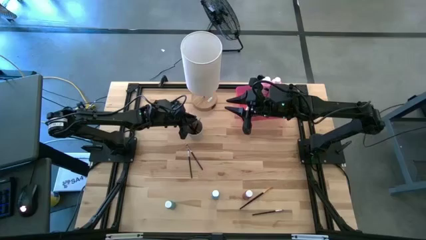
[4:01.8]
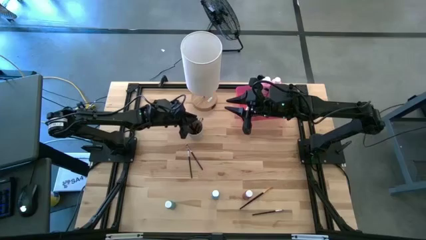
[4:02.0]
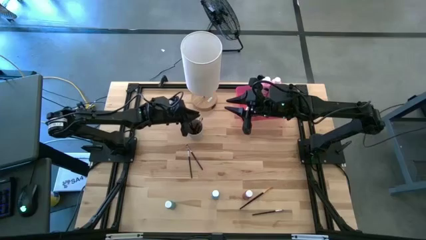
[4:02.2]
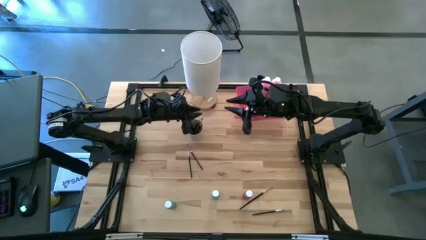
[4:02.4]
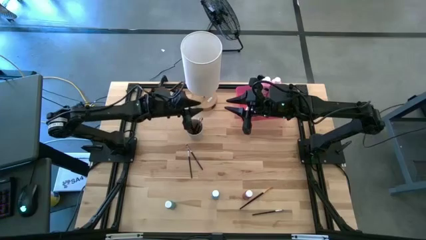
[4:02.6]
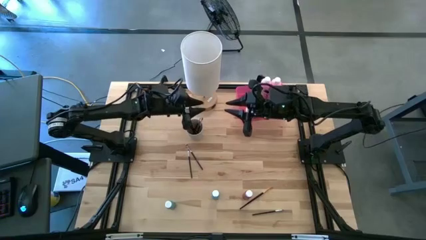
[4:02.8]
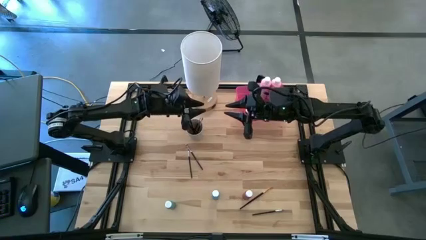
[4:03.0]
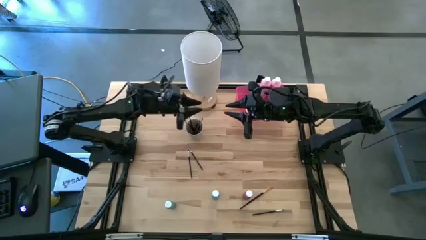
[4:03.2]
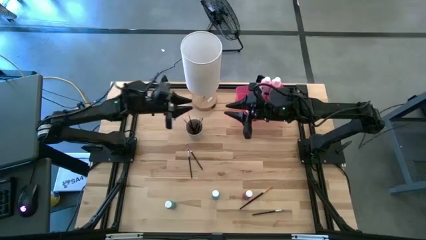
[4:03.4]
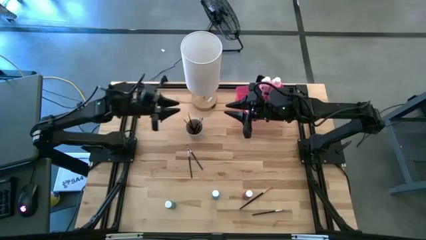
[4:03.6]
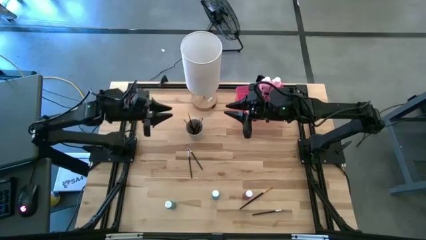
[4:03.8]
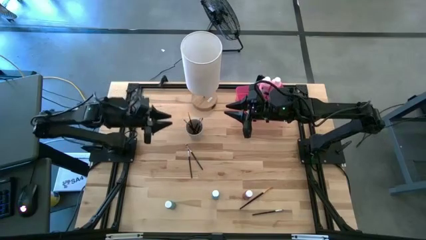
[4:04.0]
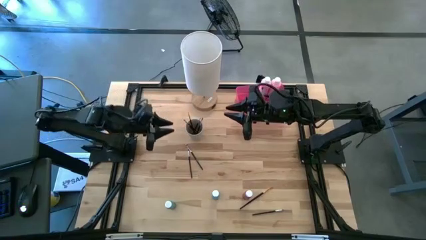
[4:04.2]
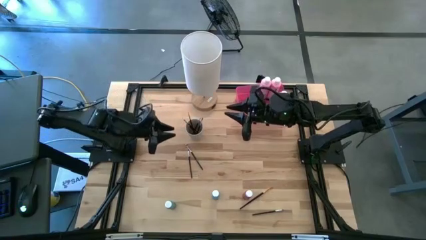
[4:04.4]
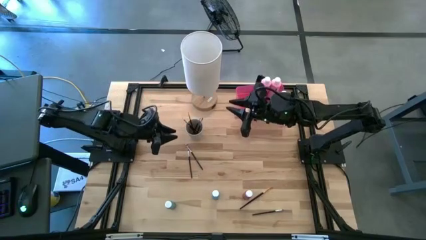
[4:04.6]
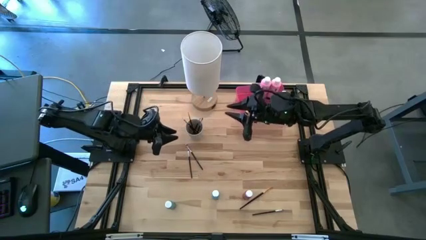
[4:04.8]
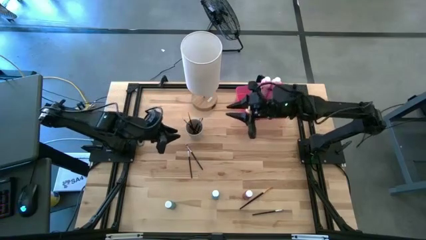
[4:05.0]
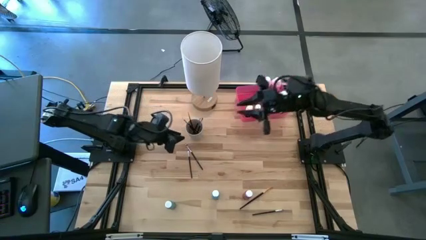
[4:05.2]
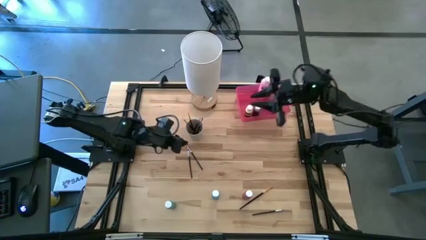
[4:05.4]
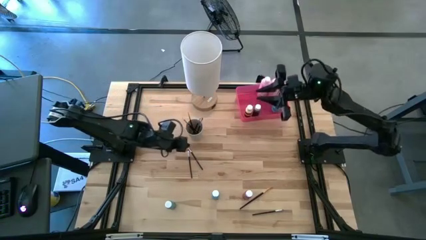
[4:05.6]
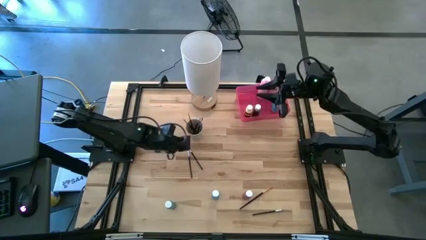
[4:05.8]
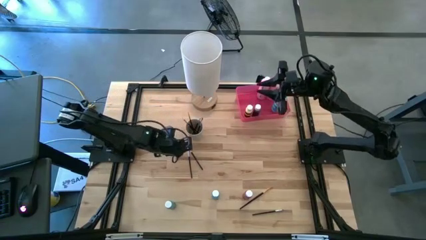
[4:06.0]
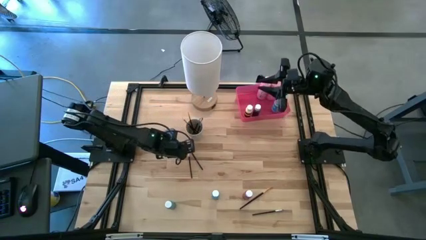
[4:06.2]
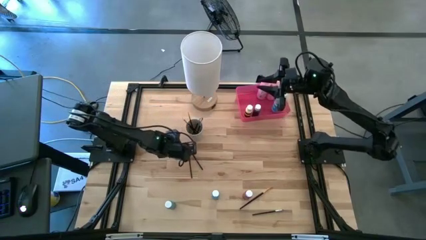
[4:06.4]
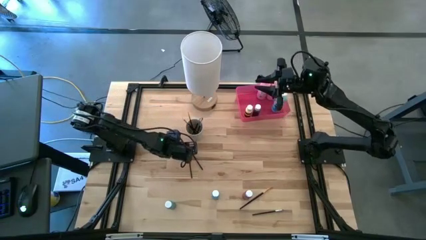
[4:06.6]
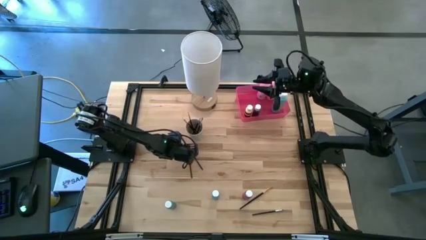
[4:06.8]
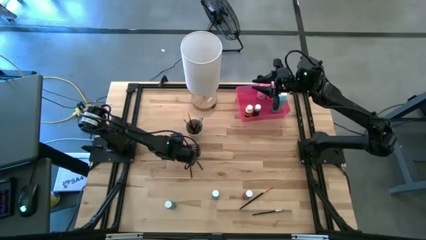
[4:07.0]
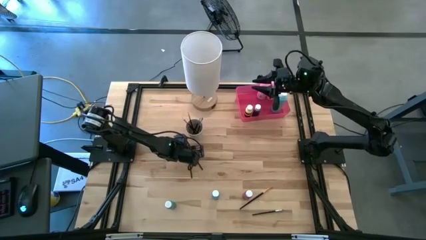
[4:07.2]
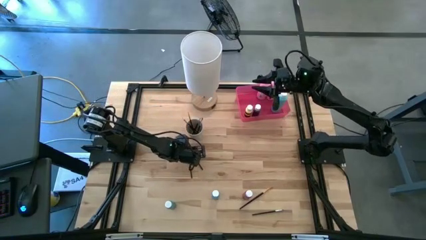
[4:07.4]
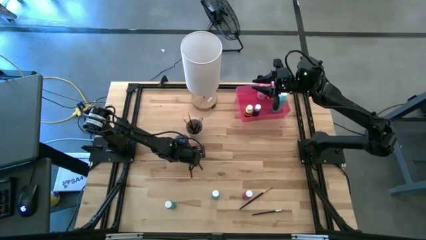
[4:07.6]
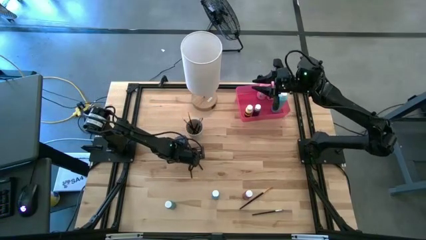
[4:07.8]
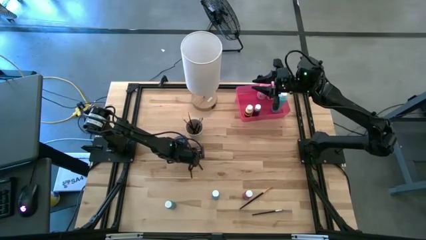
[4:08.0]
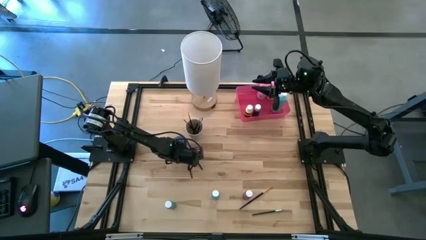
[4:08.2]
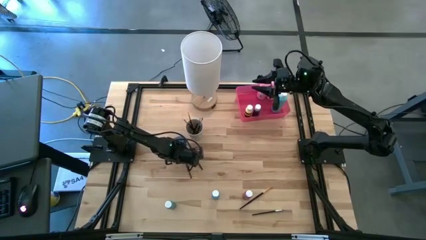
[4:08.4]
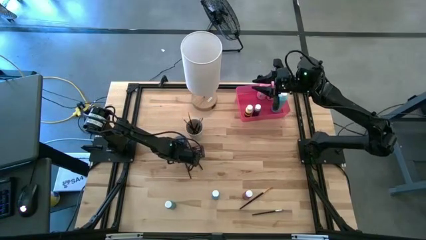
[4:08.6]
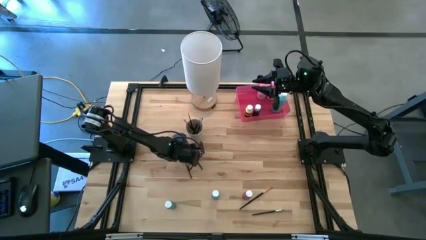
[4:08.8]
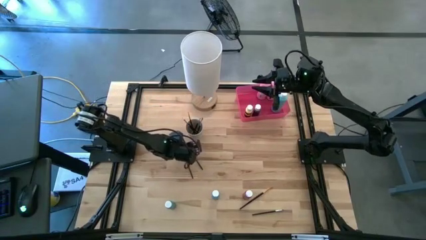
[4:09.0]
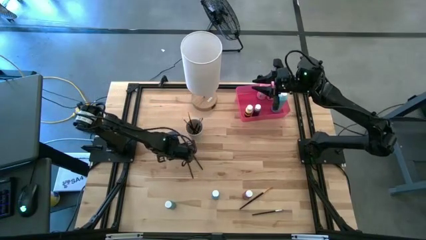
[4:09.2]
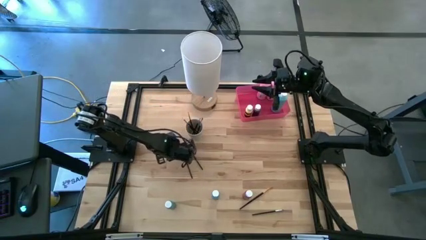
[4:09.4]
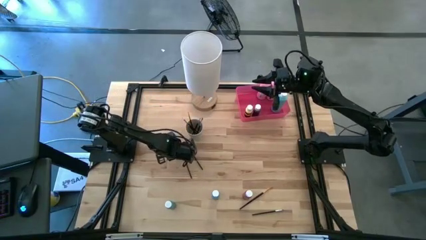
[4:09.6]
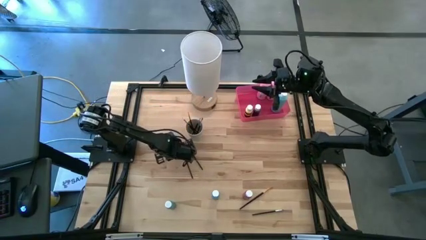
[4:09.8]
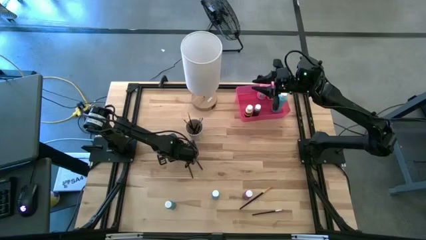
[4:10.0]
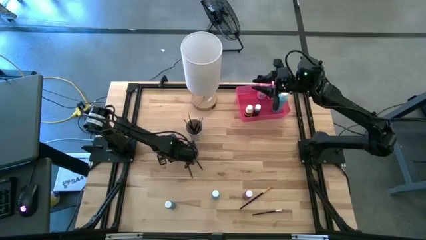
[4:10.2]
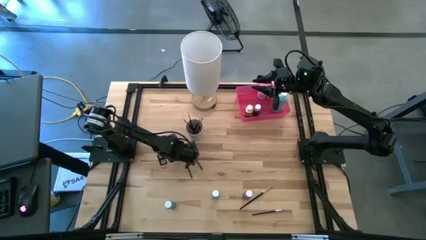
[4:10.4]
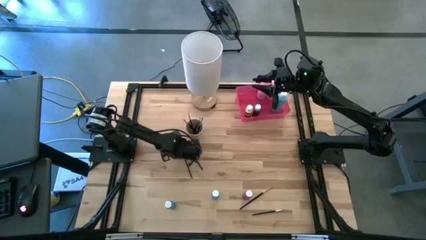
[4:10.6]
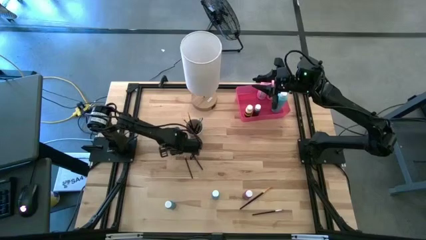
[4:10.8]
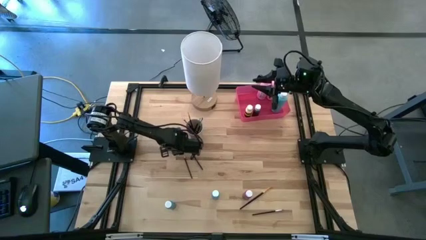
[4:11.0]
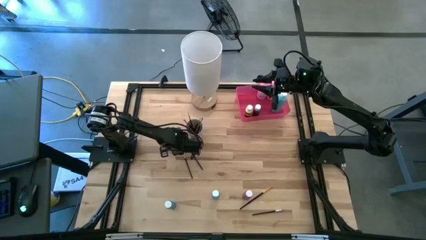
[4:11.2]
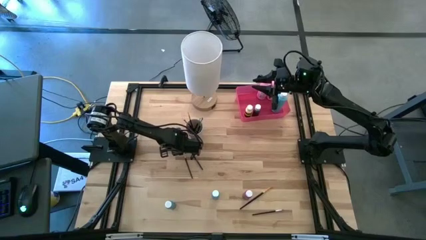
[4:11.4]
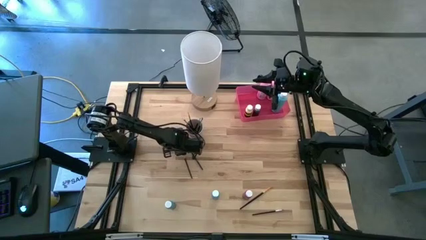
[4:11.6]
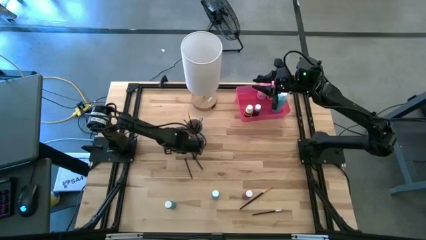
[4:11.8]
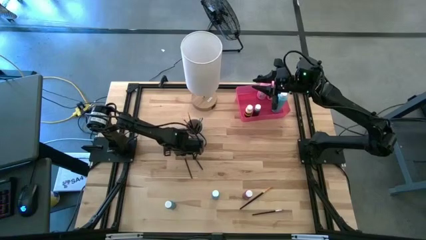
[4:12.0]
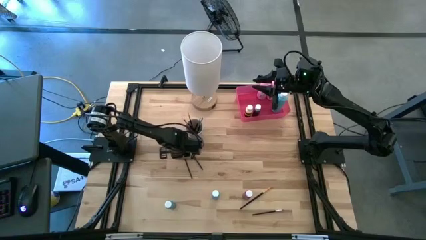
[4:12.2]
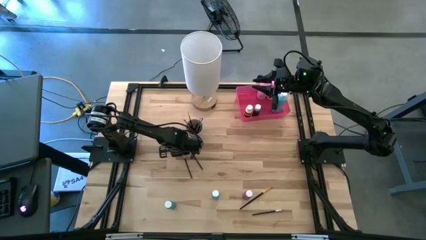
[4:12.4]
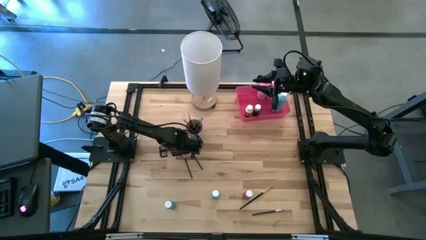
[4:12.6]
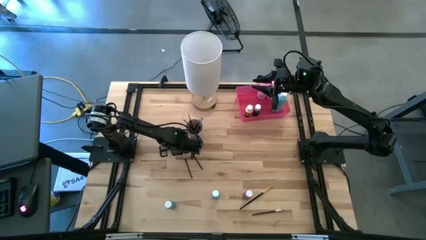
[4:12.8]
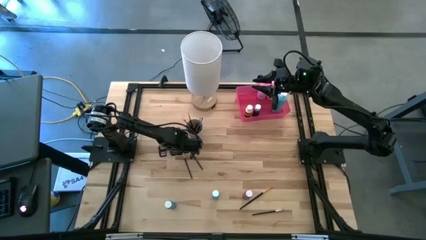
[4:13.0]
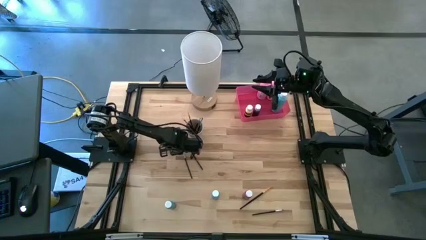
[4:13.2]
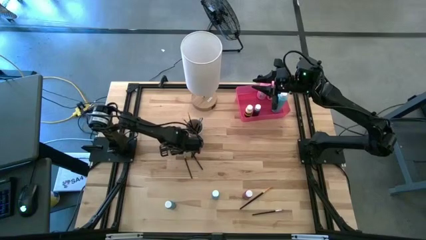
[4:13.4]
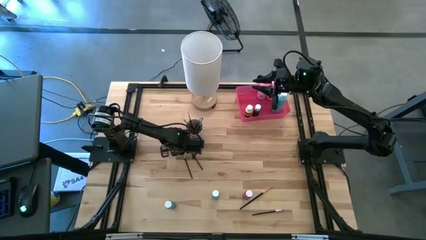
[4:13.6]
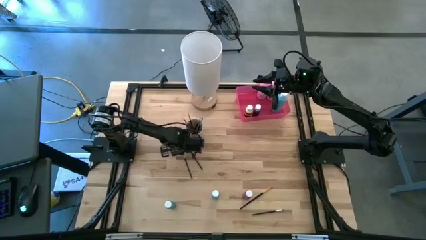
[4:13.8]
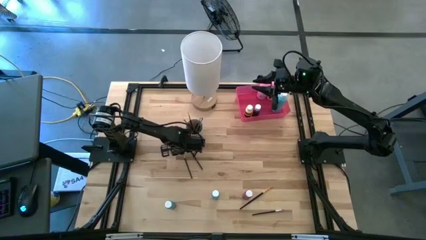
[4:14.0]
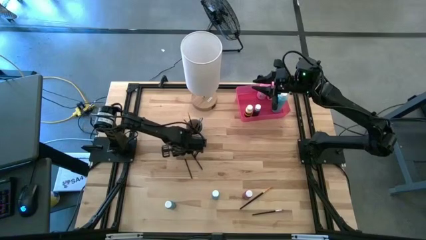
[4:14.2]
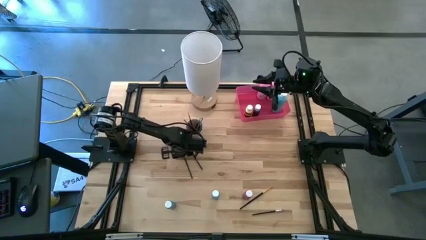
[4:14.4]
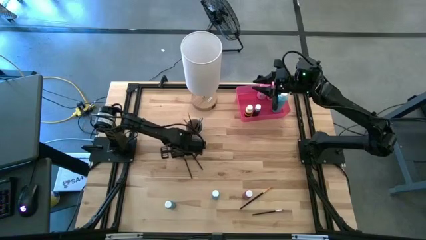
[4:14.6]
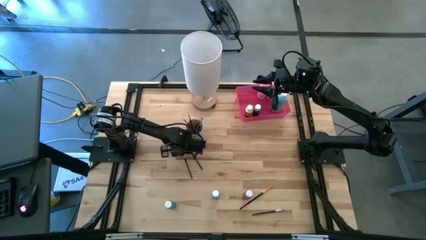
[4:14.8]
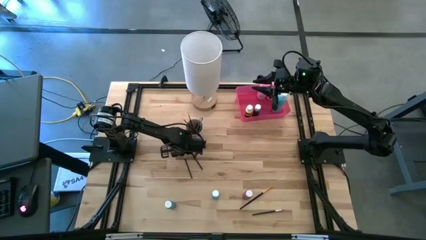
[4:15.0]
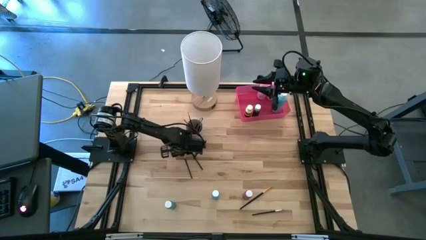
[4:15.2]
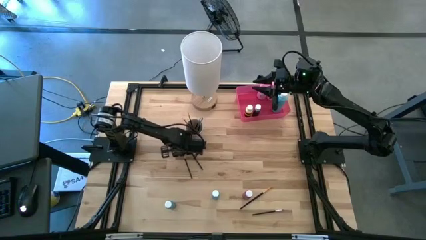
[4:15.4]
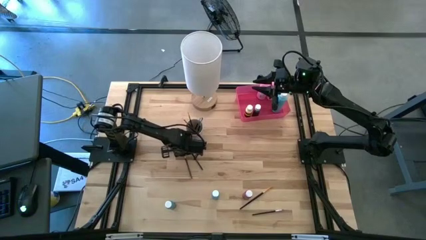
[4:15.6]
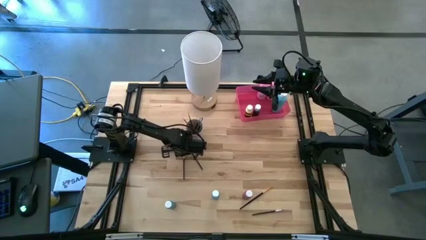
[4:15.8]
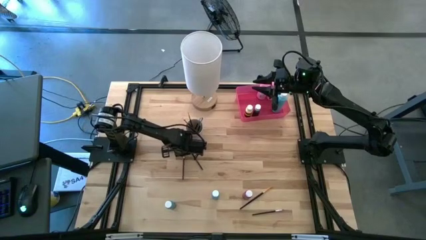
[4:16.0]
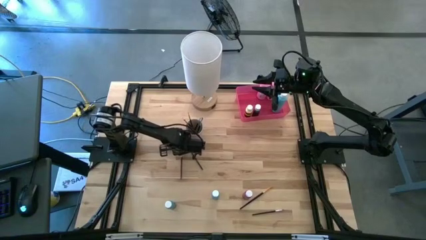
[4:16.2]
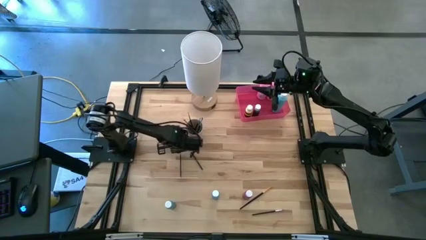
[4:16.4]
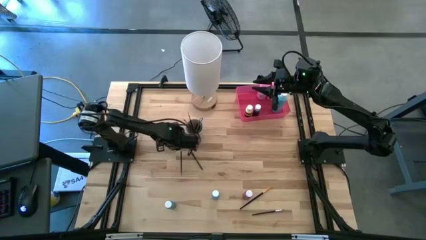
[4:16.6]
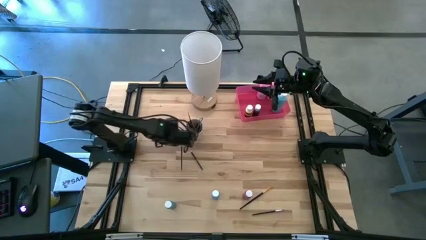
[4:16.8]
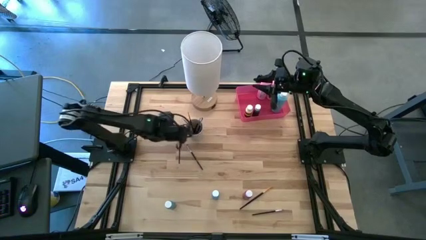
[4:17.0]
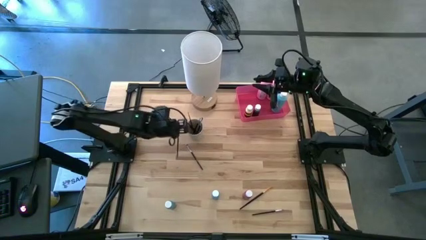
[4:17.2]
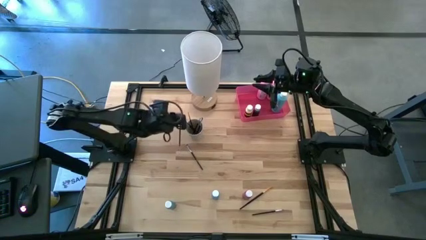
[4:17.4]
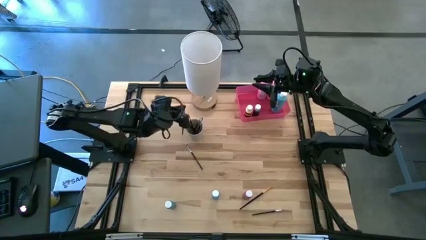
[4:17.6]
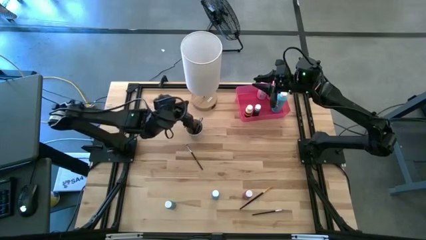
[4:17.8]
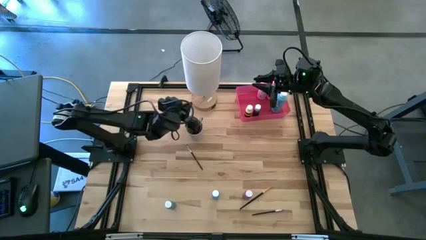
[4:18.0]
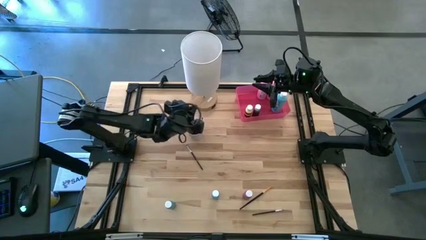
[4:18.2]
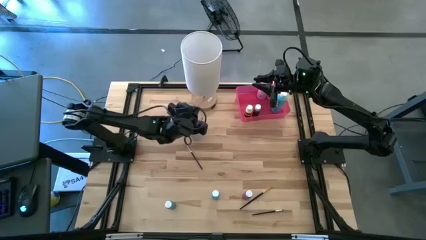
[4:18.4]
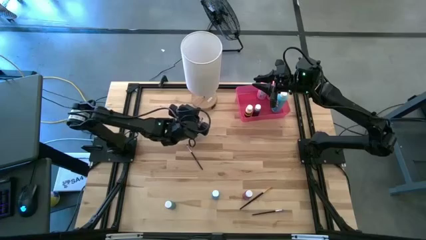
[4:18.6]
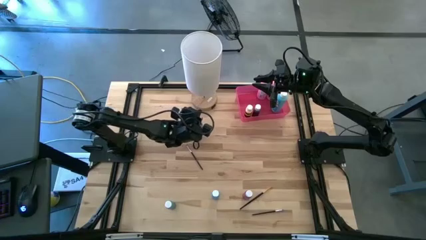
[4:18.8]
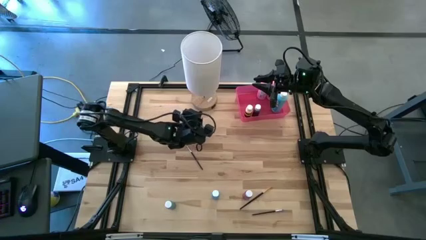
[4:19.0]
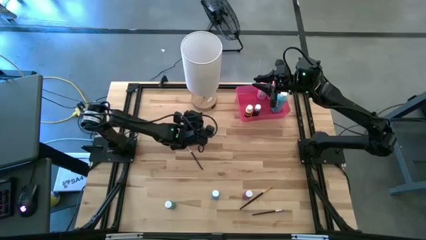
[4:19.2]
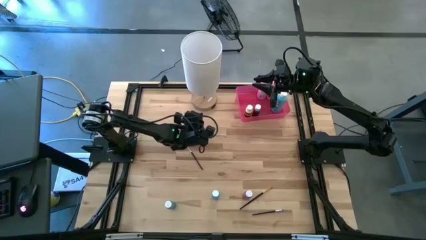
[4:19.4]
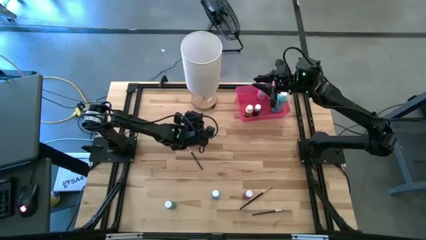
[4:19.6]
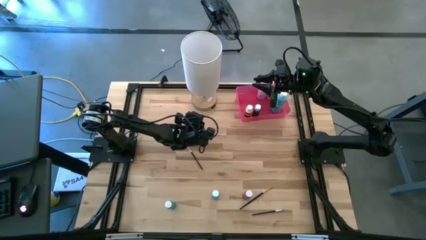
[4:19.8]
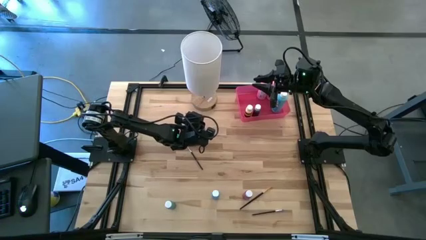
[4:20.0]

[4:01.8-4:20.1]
Task: Pick & Place Paint Supplies
Put the silver eyeshadow brush into the white cup
